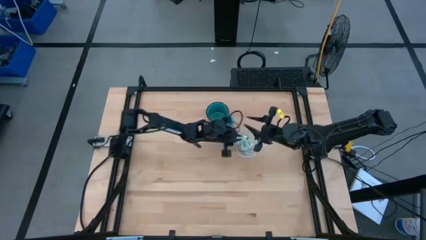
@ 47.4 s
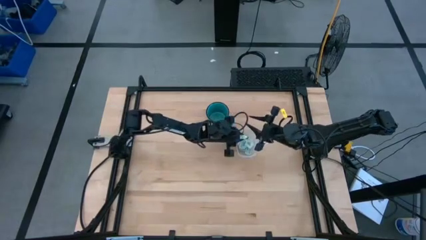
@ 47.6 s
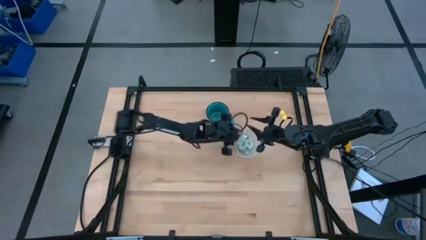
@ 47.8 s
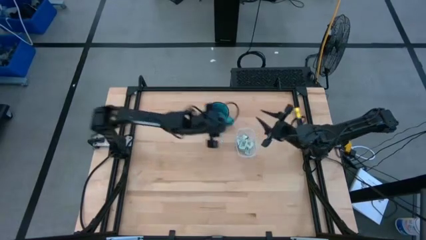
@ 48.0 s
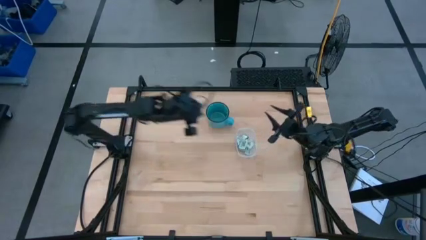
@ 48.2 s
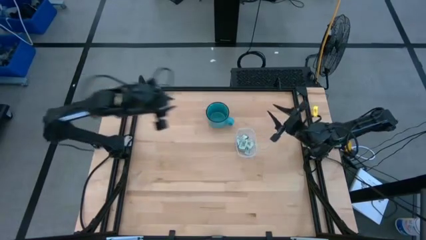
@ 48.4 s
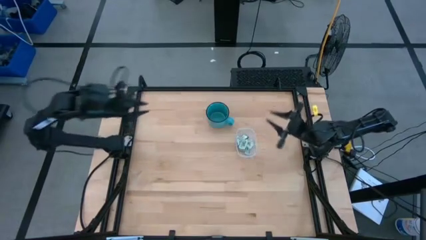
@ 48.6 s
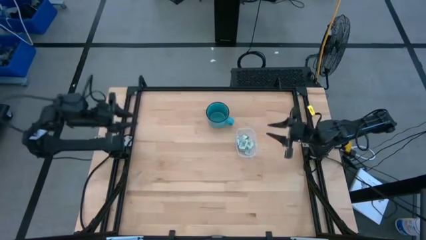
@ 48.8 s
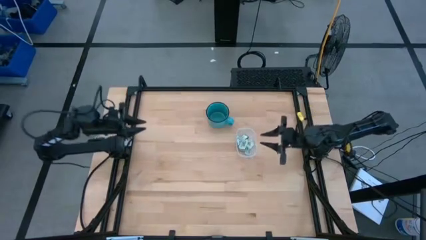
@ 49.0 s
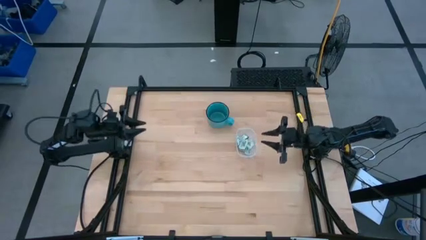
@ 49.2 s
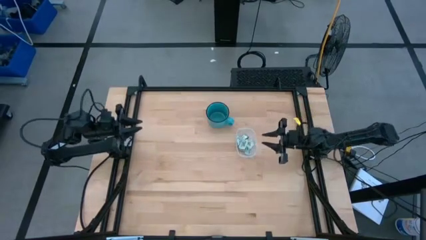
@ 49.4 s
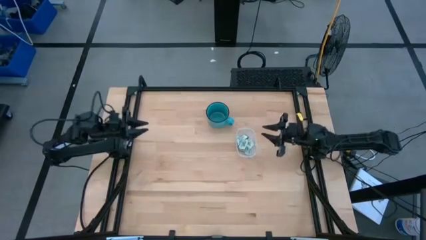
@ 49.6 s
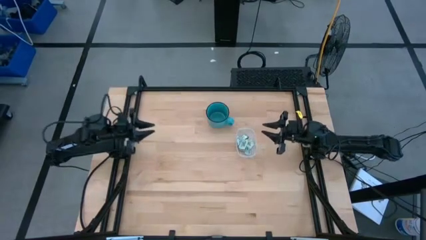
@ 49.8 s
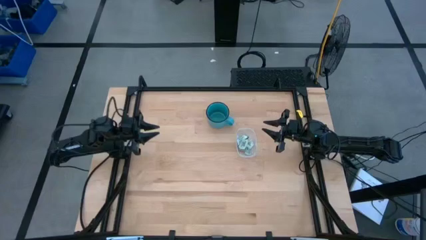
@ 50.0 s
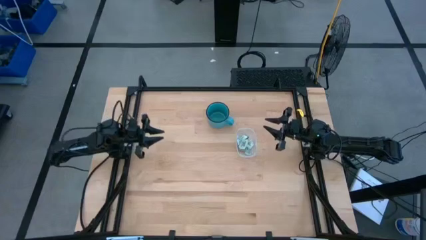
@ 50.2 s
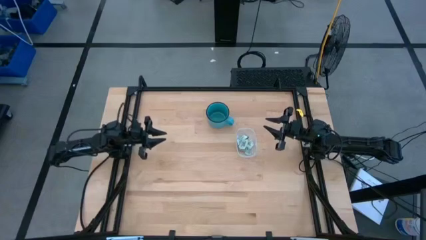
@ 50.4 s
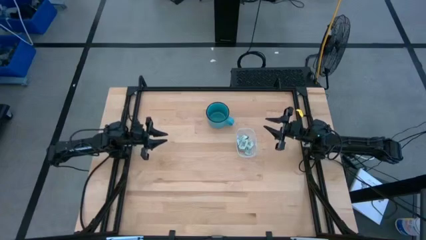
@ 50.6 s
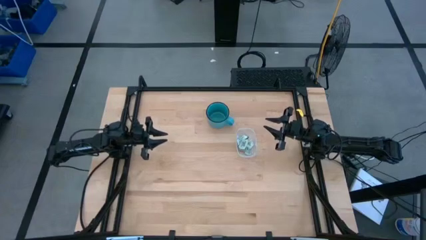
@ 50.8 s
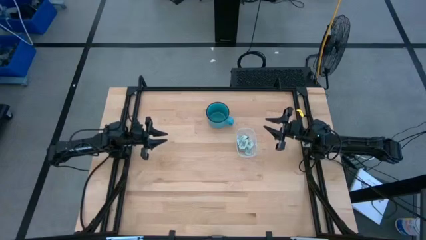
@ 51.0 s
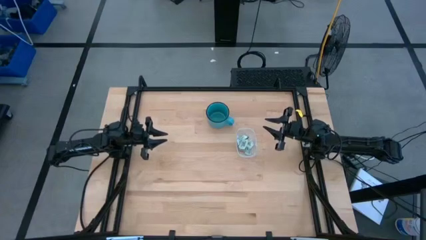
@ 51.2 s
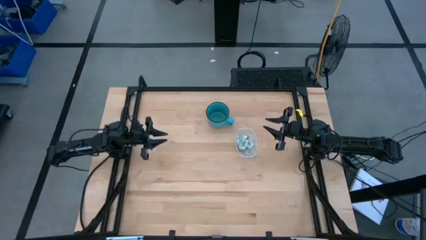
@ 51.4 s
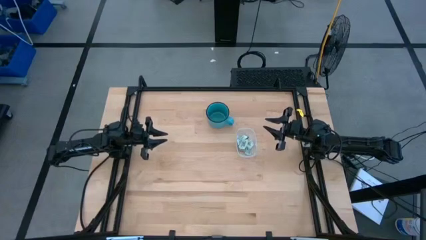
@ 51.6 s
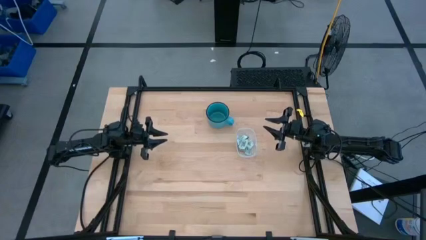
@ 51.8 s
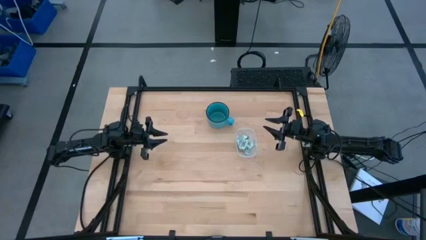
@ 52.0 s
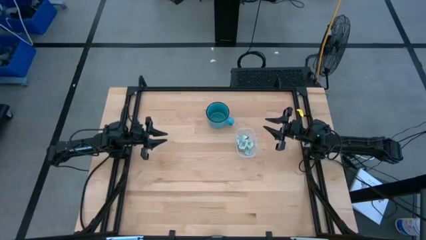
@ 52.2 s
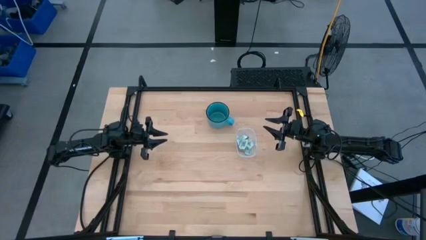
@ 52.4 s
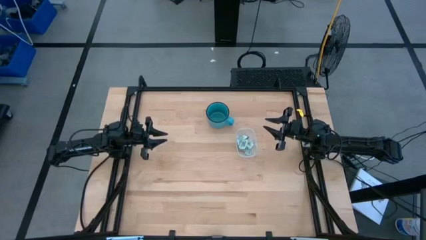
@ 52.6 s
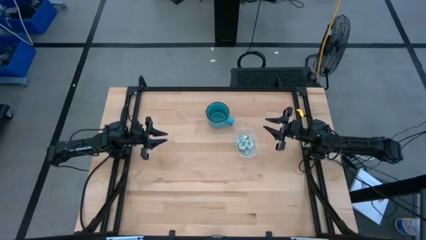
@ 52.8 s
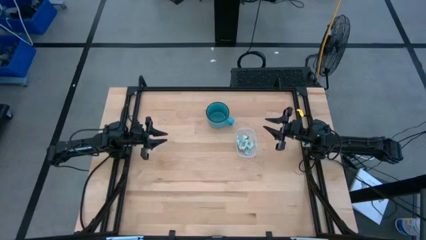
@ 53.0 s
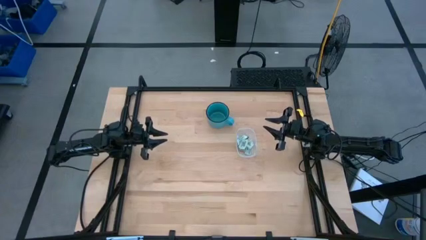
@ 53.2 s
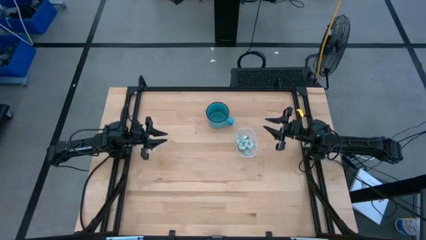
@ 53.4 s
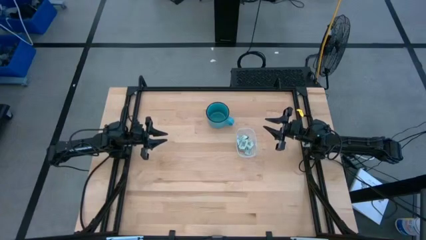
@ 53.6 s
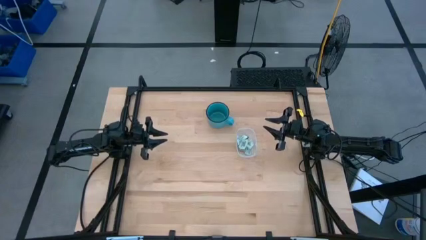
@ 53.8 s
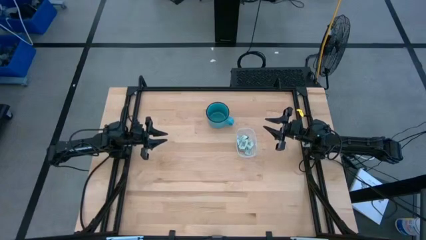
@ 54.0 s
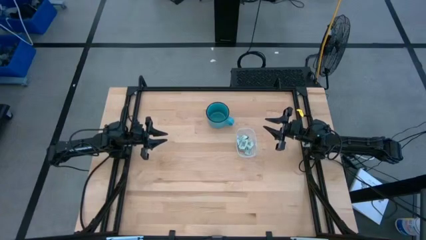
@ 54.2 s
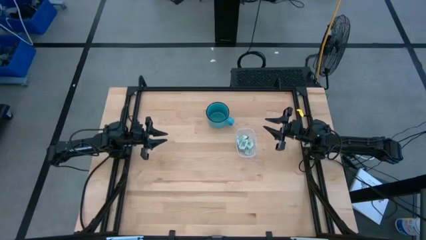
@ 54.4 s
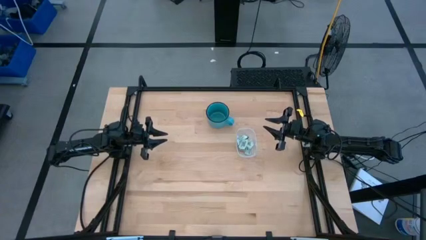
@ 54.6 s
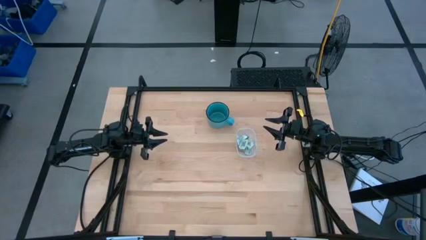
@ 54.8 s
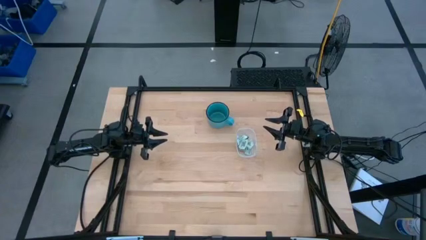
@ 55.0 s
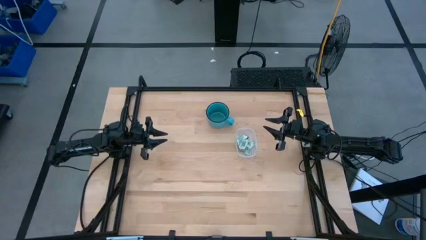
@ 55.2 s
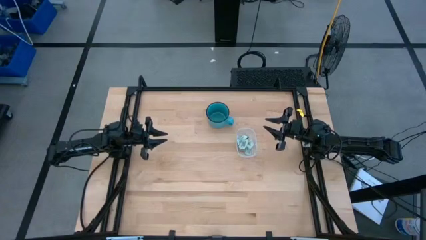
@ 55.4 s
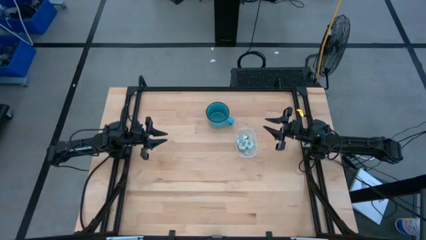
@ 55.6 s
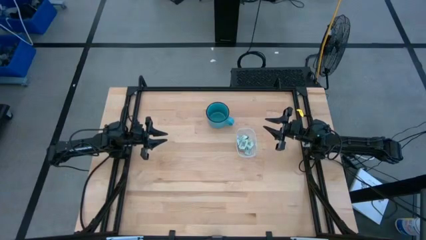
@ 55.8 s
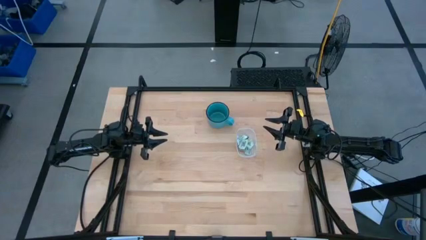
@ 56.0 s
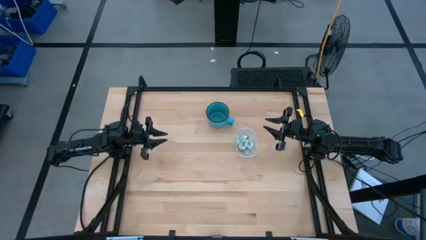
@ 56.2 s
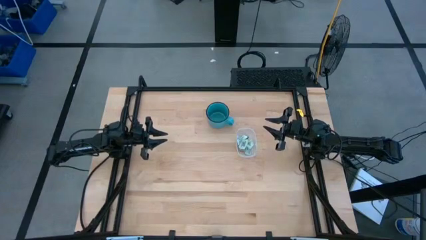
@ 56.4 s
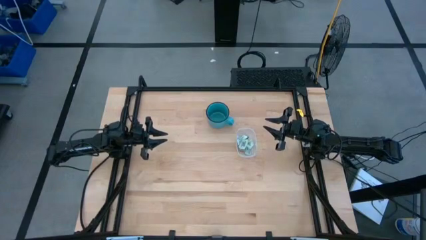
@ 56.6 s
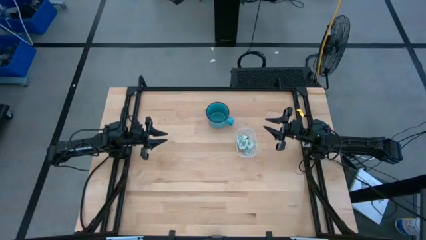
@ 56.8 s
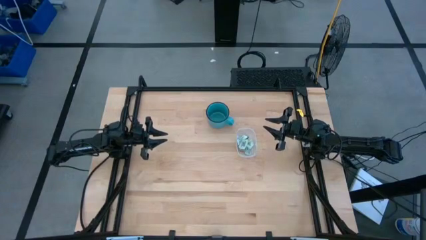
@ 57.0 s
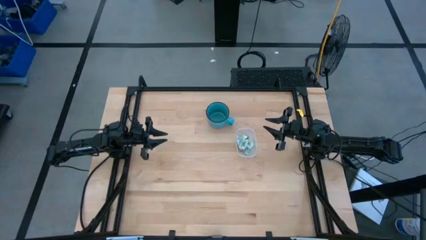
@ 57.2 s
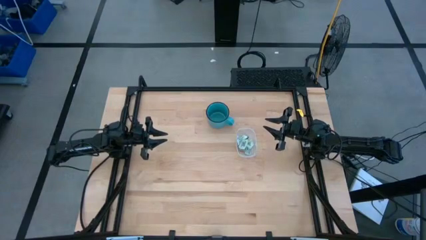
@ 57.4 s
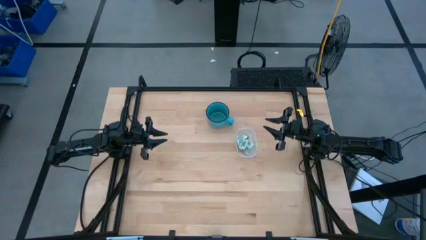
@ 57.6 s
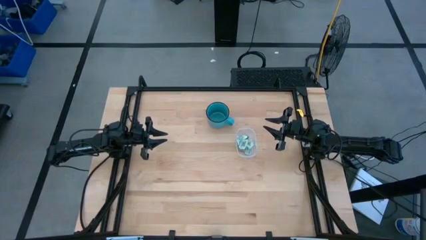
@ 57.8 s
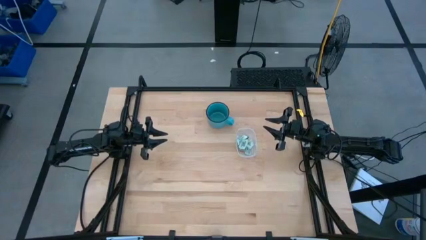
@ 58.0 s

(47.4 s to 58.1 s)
Task: Pick and place Stevia / Truvia into bins
Return to Home Position

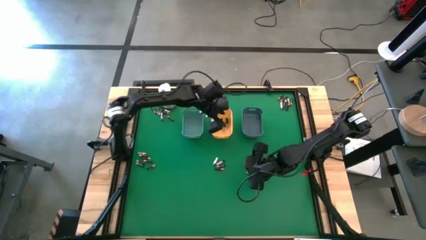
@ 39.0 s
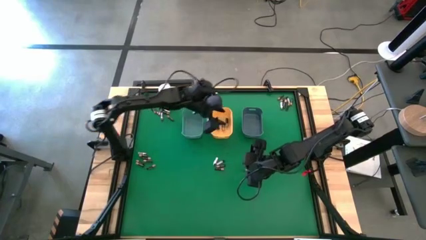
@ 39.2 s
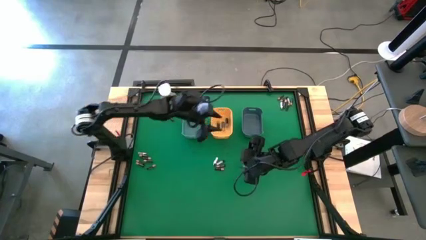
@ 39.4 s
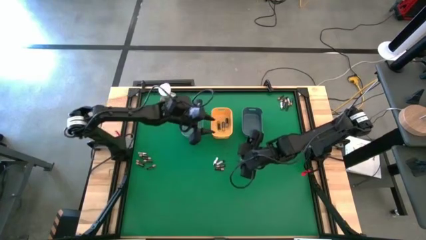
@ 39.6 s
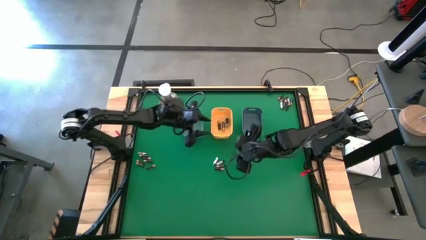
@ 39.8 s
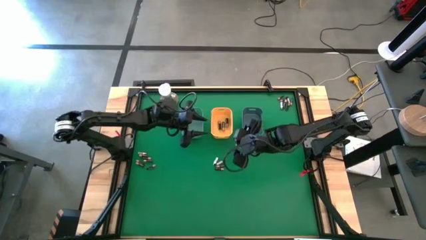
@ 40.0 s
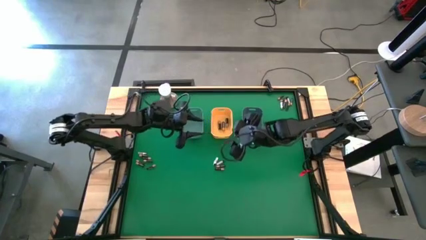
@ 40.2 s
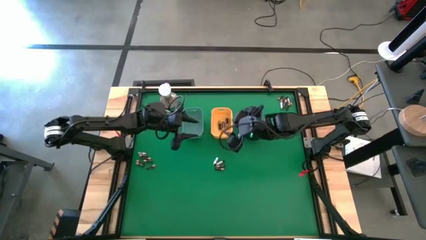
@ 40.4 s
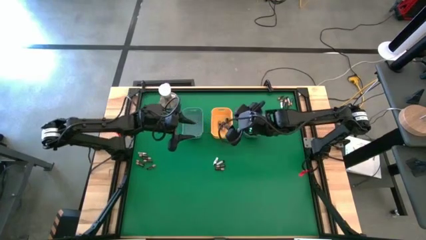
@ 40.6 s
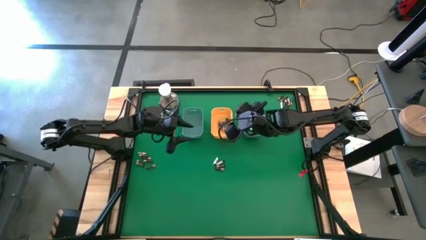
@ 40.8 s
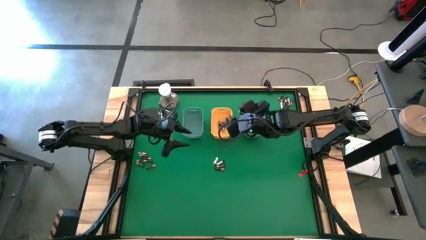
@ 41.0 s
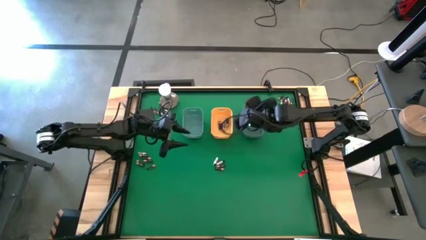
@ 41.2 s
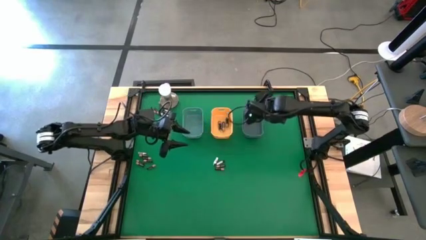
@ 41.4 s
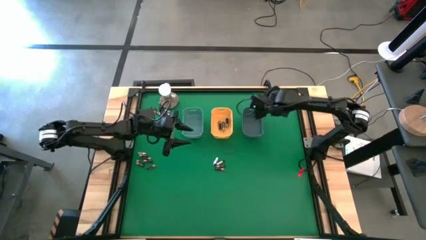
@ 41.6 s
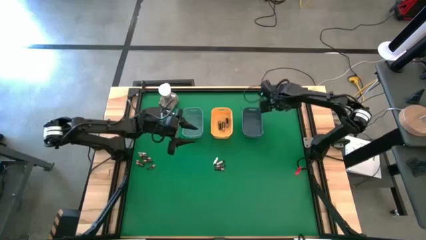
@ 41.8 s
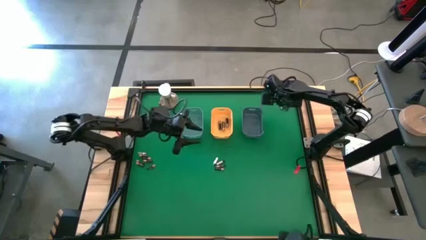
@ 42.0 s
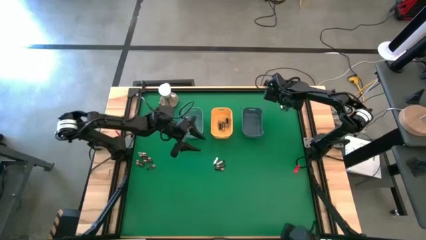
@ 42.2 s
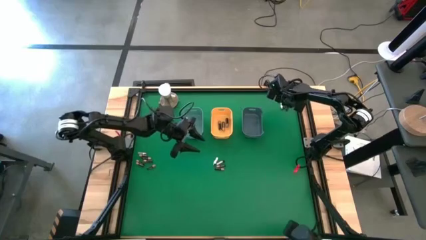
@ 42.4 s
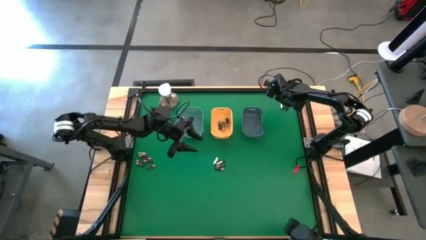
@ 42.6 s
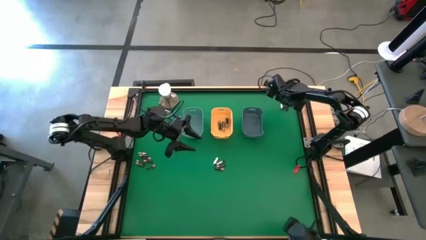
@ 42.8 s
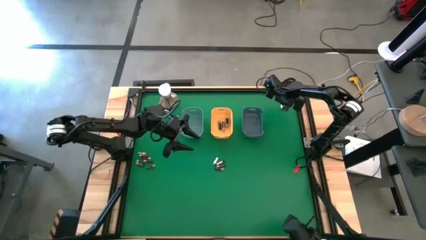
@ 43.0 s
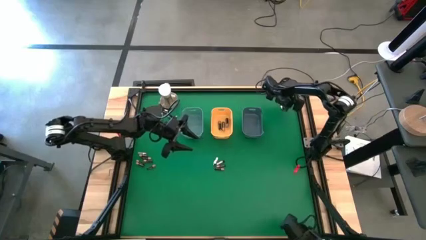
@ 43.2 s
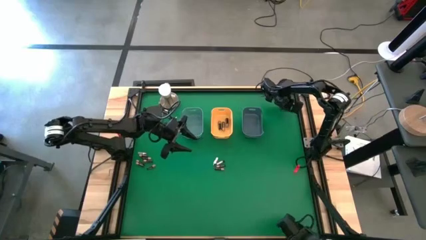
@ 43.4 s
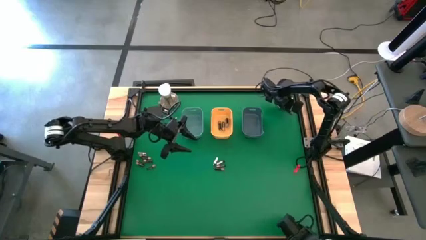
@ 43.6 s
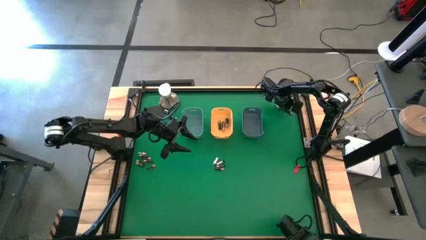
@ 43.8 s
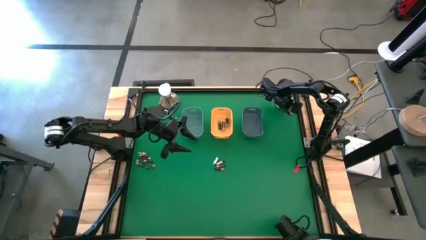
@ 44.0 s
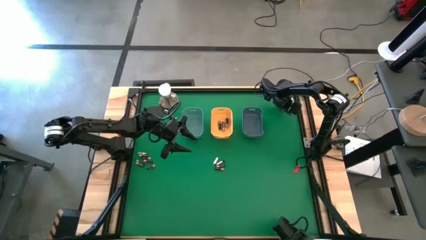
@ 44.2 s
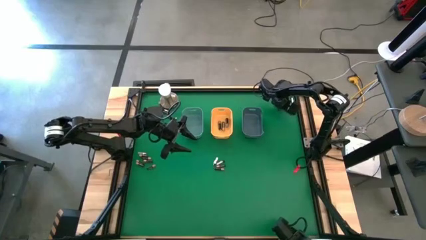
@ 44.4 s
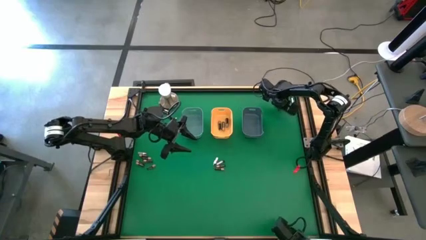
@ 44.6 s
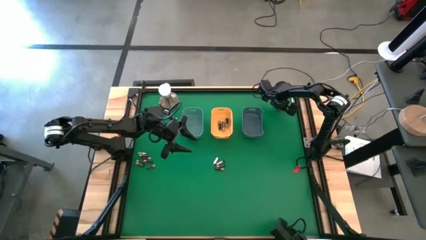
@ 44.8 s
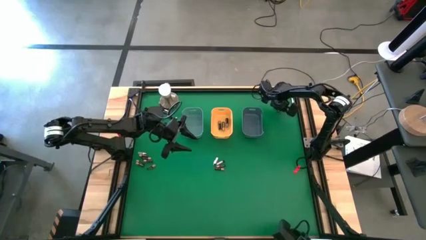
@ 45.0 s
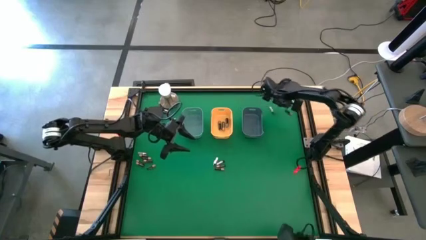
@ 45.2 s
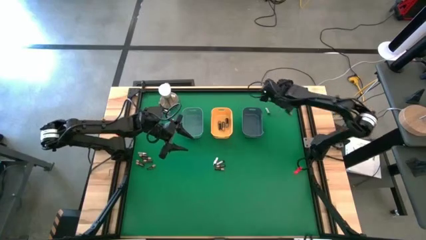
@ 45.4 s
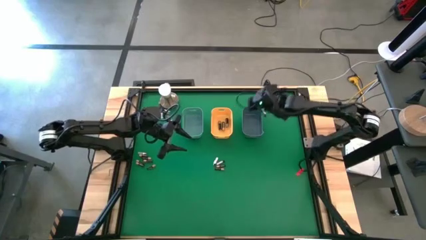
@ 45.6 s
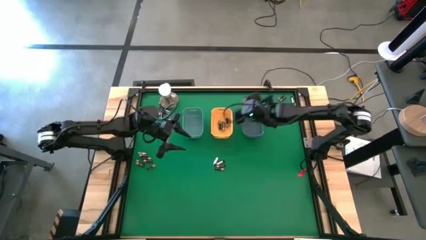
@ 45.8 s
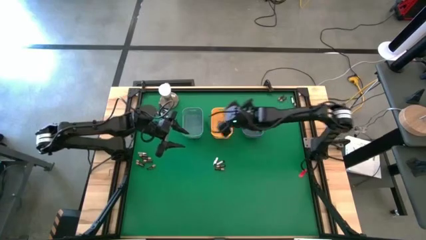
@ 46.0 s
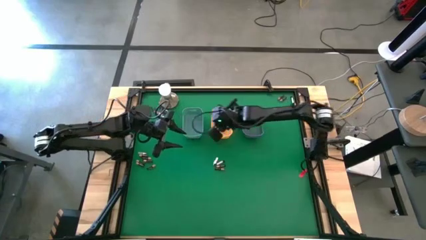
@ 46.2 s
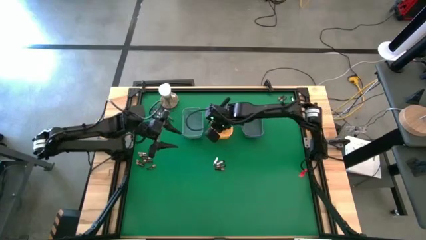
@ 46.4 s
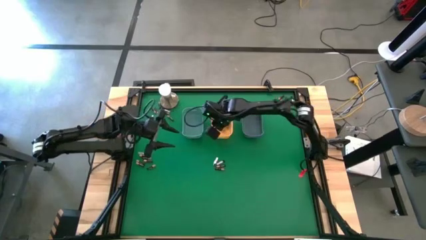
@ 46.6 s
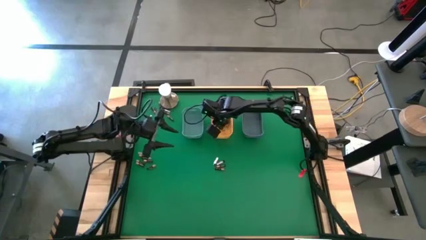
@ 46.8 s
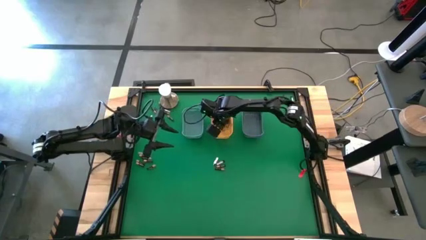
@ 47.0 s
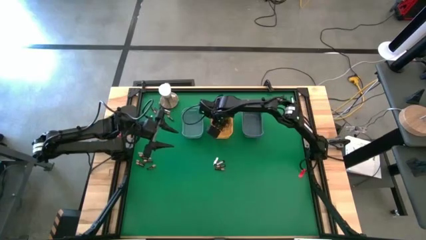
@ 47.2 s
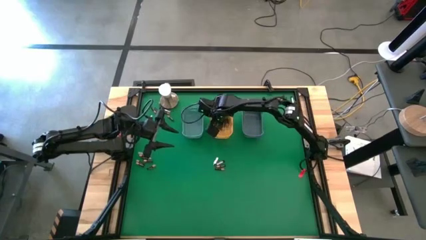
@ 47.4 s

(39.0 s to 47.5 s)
Task: Sort batteries
Put the large black battery into the yellow bin
